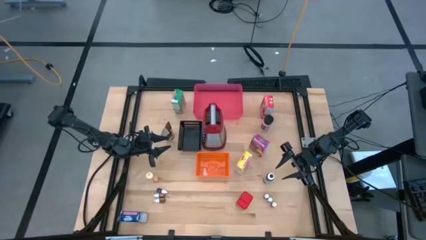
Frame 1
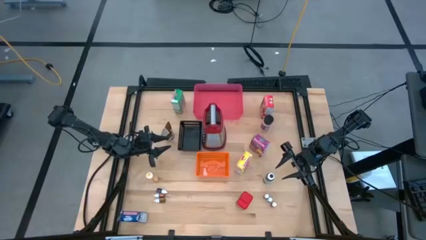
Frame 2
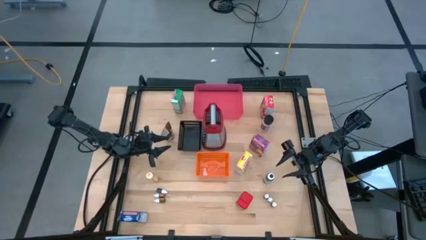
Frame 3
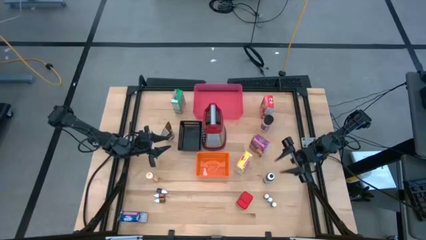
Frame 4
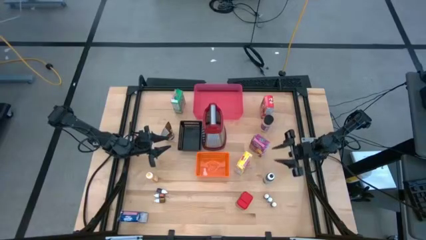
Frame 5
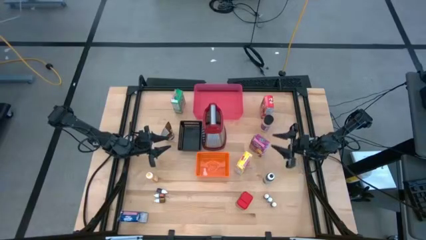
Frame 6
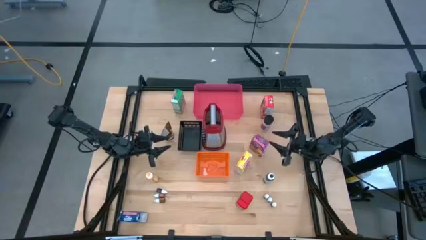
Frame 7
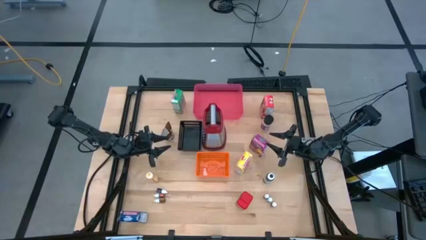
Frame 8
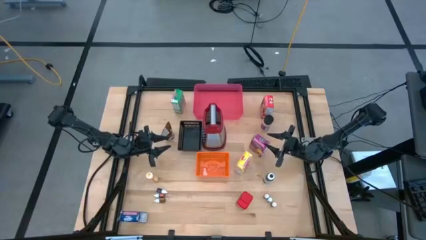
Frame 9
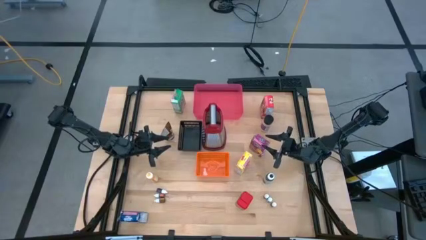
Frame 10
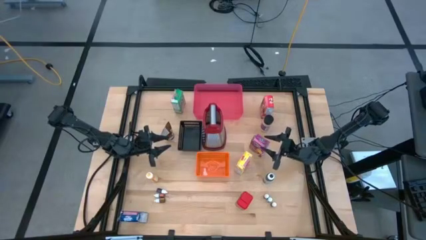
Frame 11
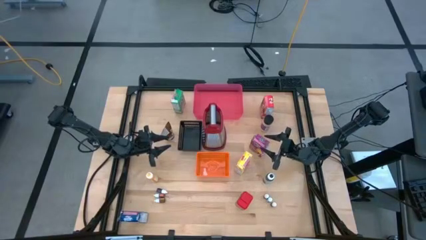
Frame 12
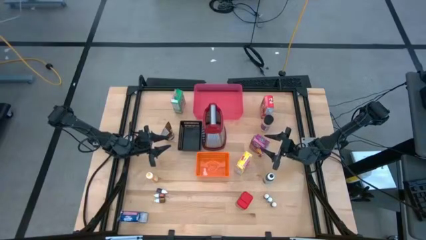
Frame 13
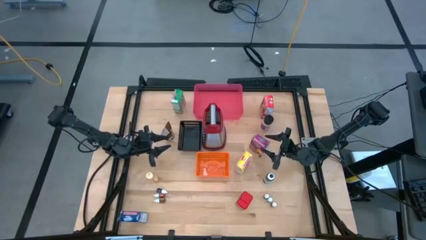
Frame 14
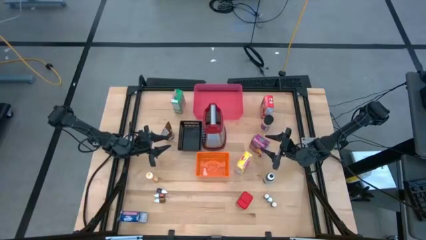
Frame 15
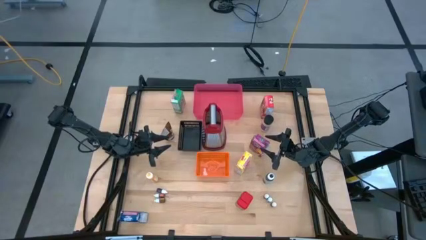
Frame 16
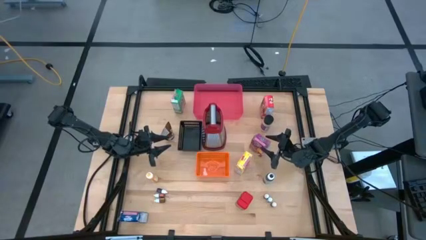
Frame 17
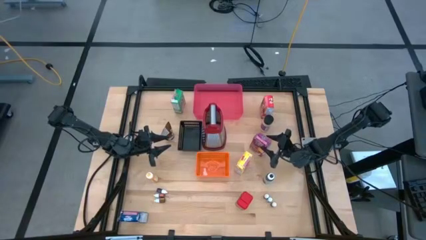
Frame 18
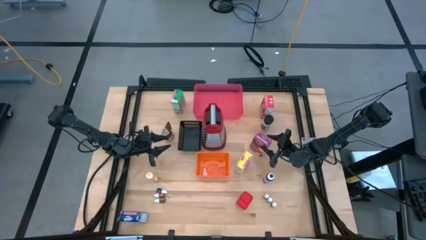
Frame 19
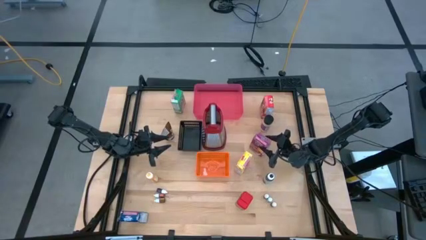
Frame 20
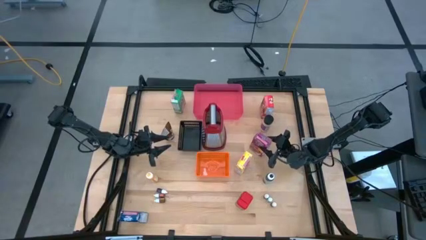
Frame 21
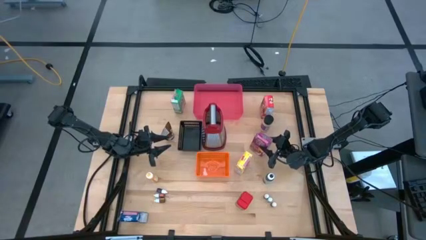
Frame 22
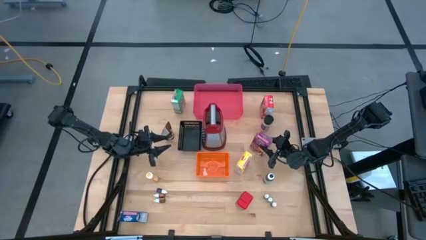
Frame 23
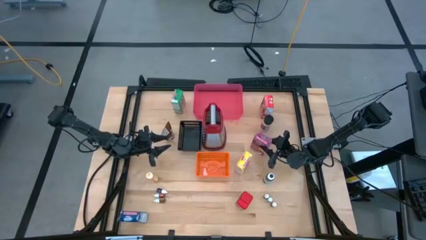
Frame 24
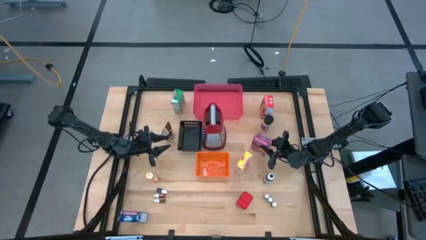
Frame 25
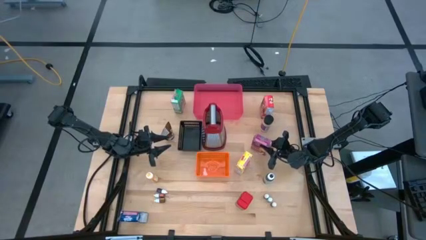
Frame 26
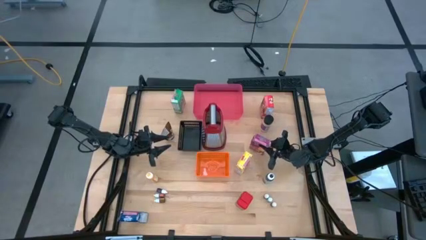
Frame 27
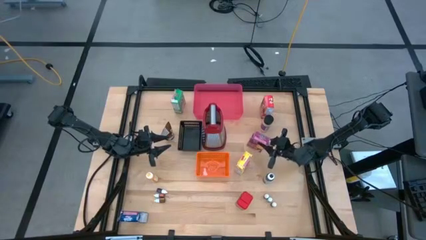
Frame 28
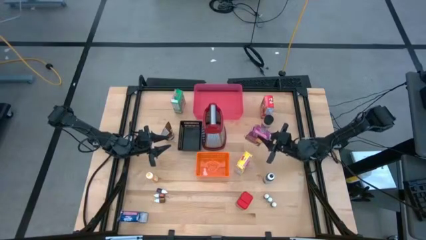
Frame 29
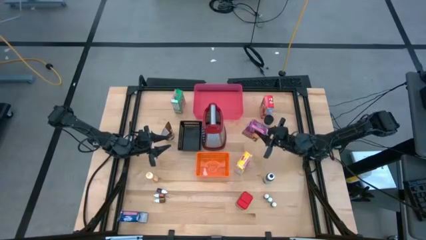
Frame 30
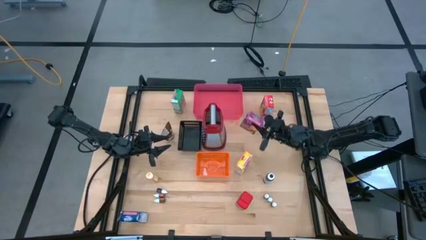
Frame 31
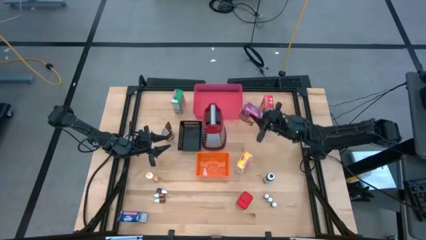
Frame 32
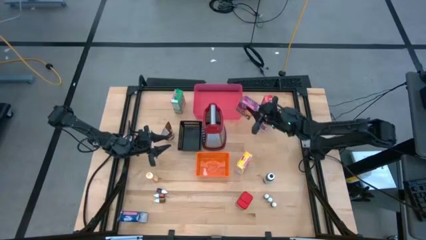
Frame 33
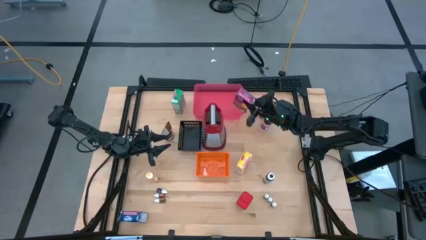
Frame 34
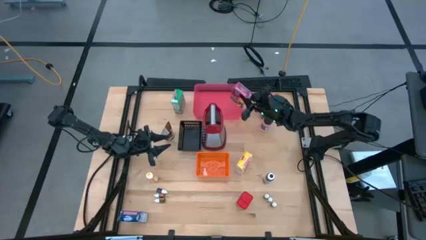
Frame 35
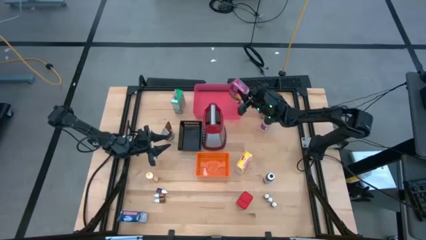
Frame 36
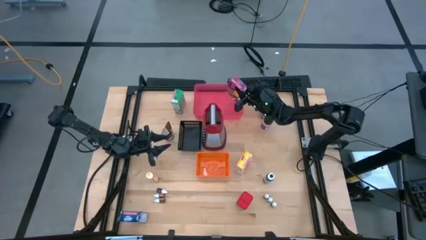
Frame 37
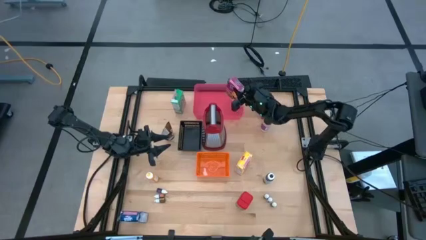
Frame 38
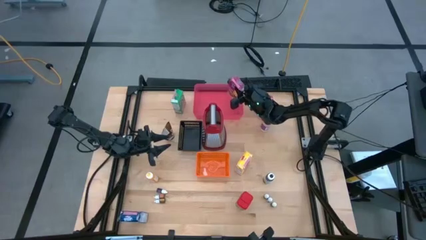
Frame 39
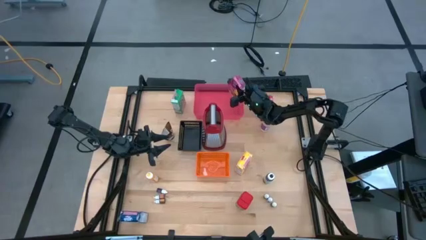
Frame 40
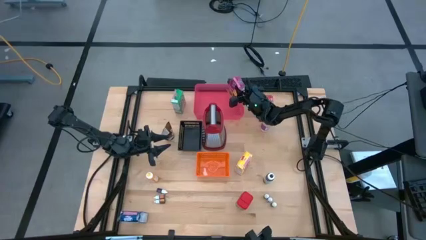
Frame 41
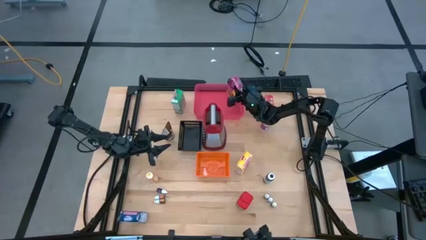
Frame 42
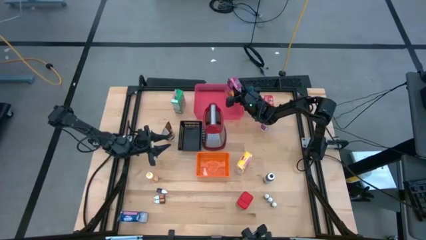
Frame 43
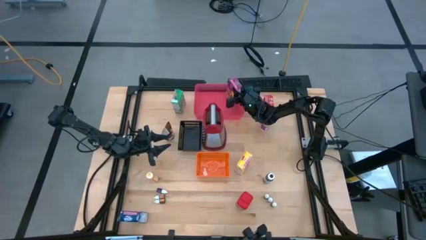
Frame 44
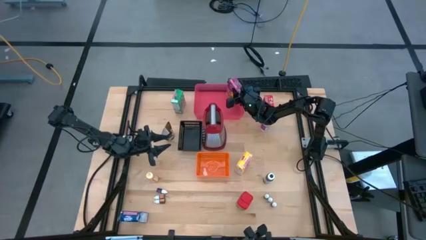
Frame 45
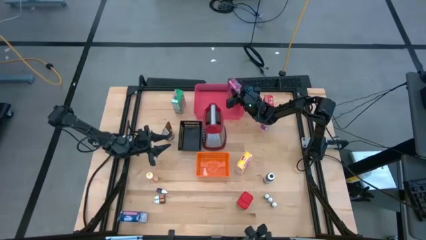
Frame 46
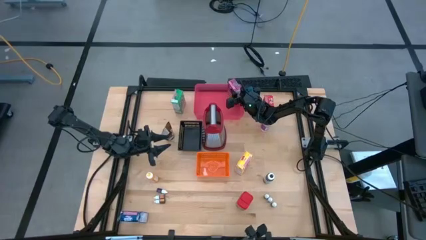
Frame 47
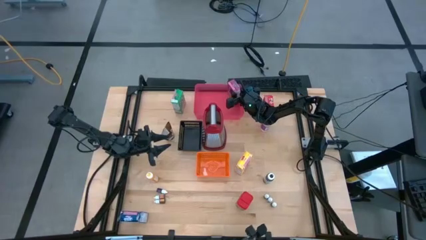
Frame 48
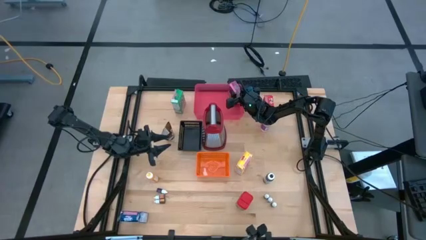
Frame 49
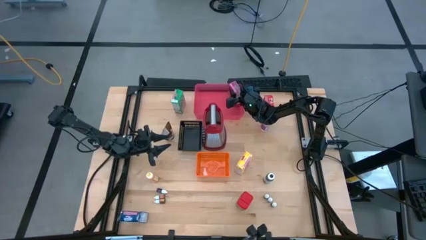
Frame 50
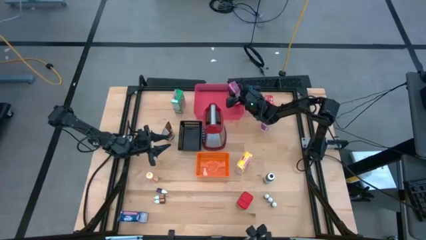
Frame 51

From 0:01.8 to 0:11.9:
Task: Pick & Place Kitchen Items
Put the purple cereal box into the pink bin

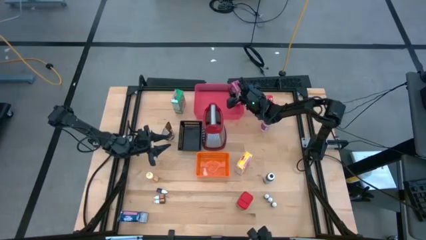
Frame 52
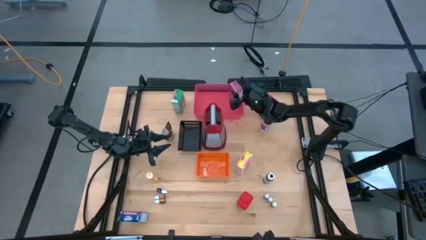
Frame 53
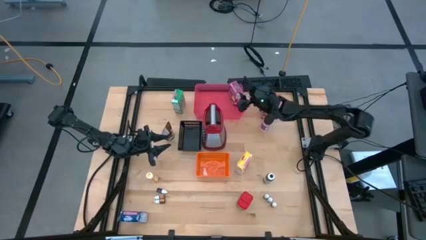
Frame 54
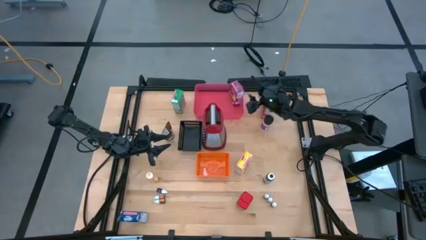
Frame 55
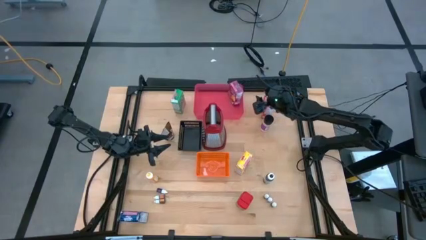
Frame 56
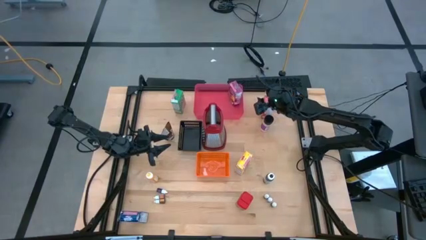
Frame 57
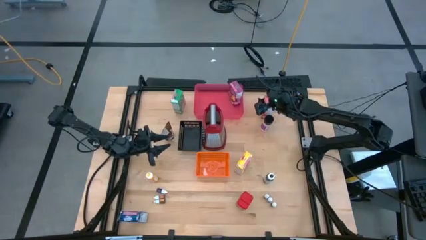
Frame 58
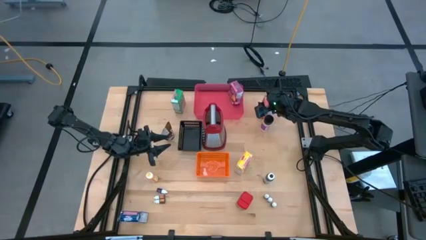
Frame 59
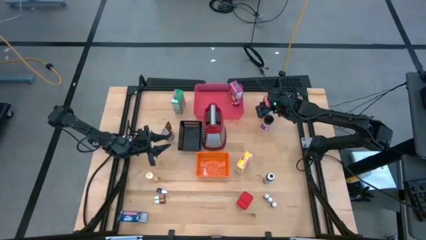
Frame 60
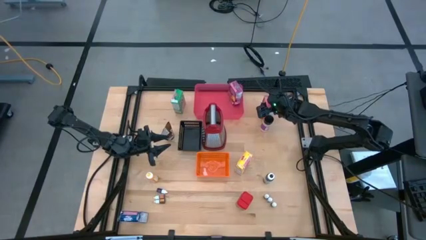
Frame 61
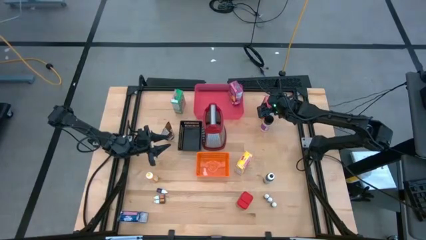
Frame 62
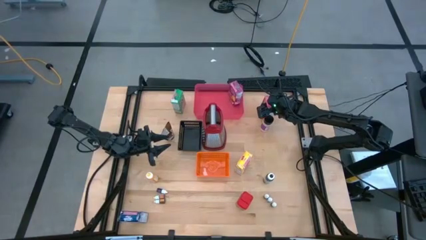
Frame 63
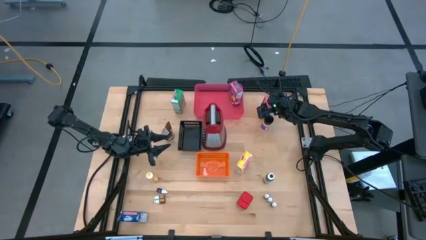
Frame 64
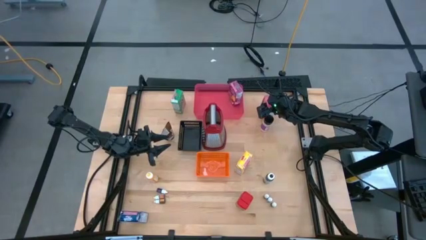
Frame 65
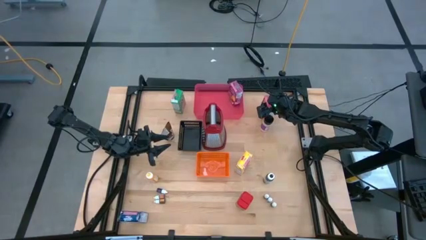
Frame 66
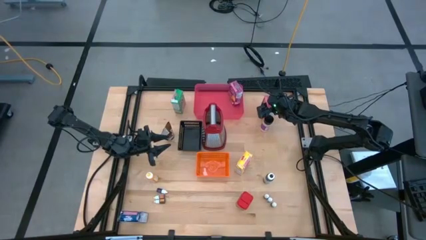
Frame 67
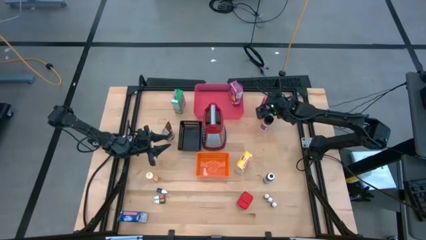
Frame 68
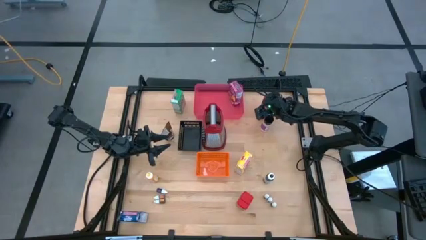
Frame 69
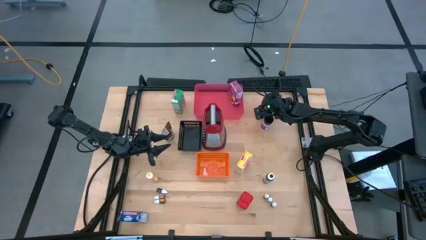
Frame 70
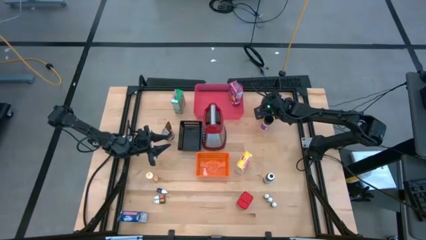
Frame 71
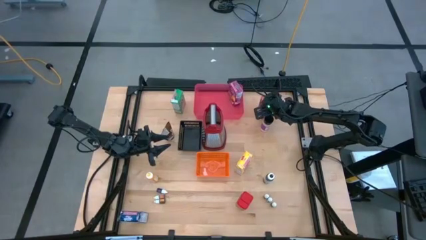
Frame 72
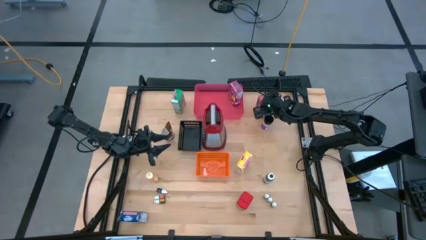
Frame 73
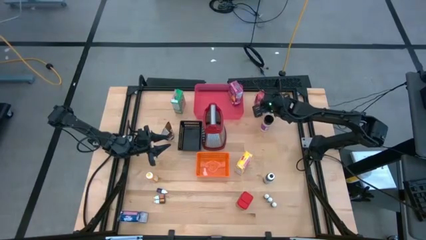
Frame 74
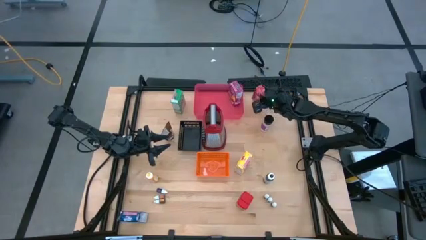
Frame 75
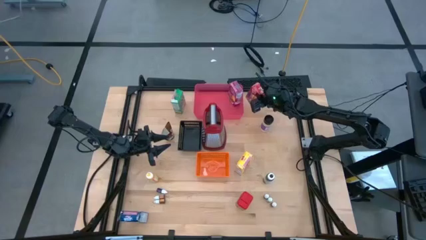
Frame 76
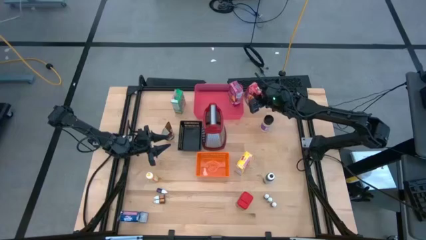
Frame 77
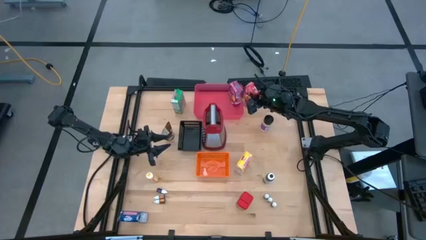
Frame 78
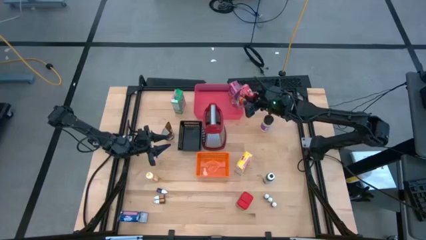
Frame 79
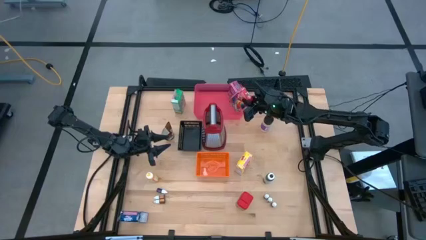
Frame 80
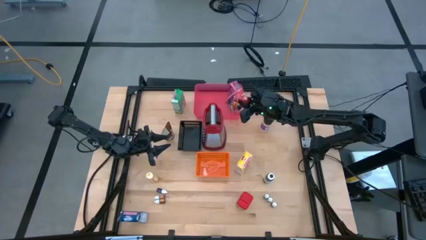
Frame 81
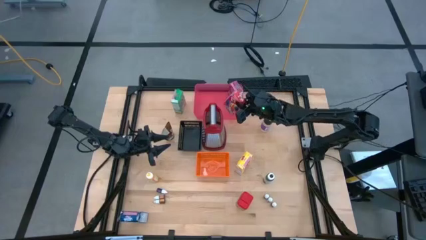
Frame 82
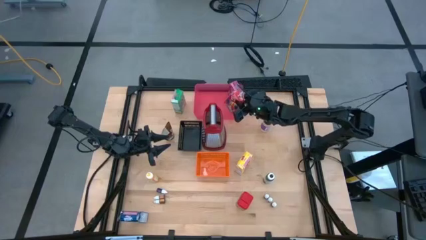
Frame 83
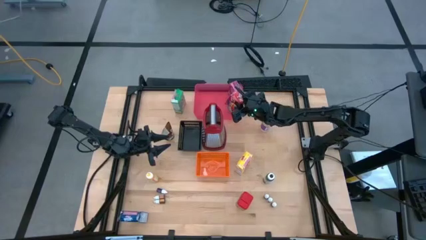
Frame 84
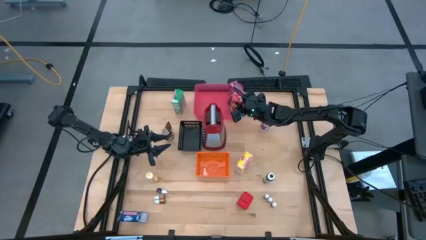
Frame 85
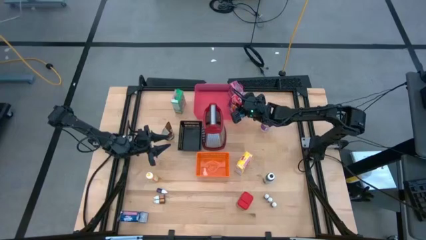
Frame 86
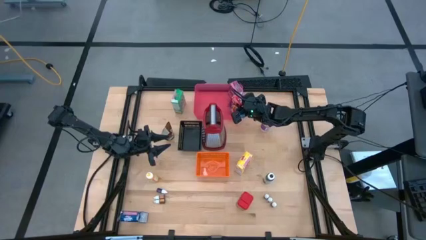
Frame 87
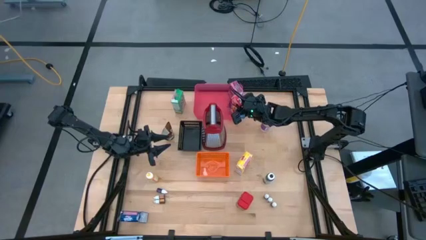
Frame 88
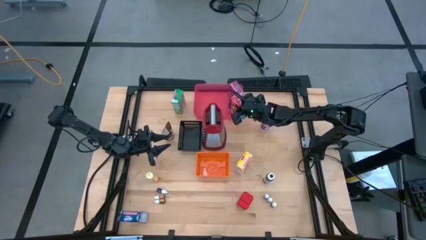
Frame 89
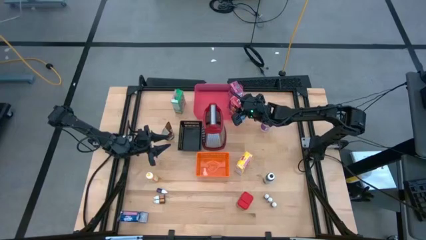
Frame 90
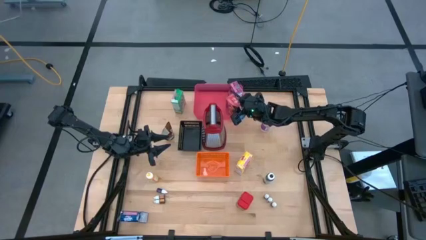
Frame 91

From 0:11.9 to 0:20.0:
Put the red cereal box into the pink bin
